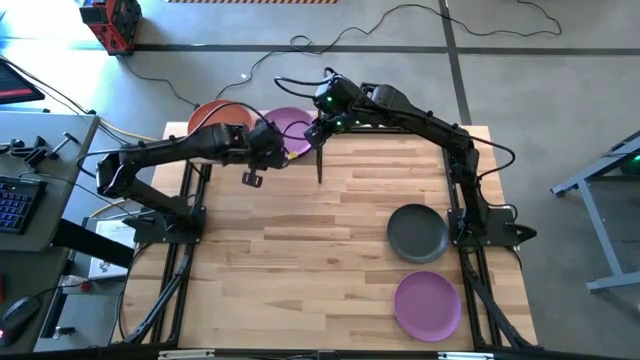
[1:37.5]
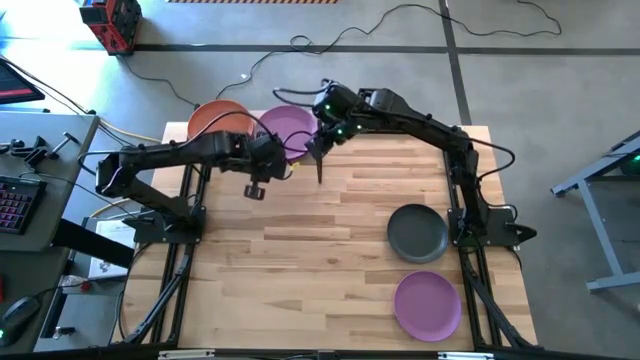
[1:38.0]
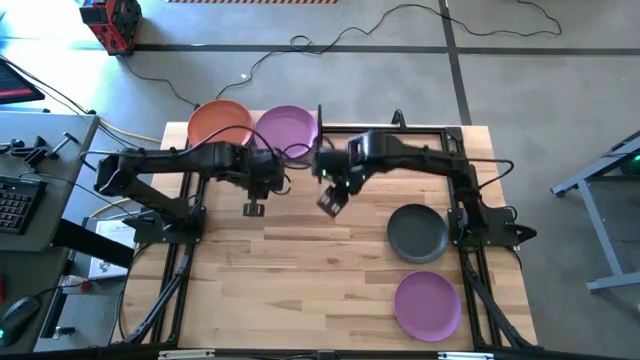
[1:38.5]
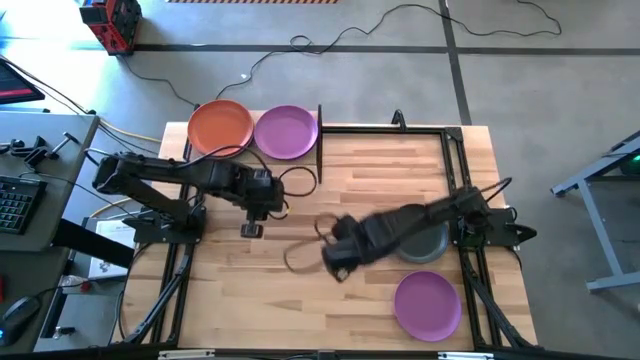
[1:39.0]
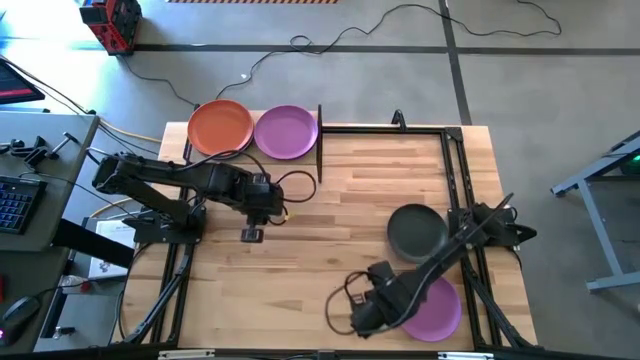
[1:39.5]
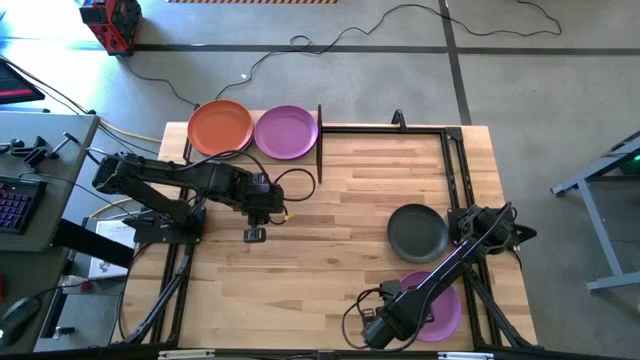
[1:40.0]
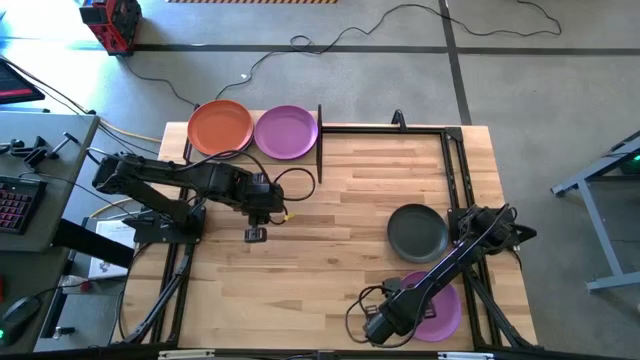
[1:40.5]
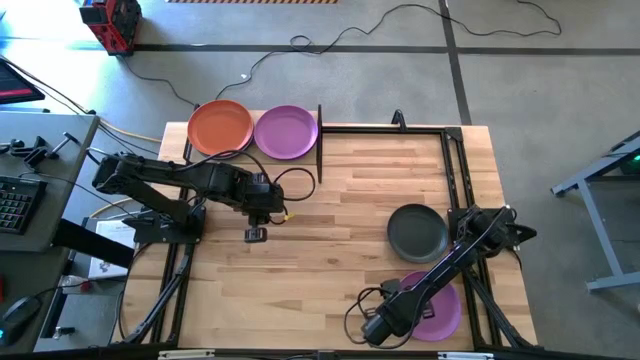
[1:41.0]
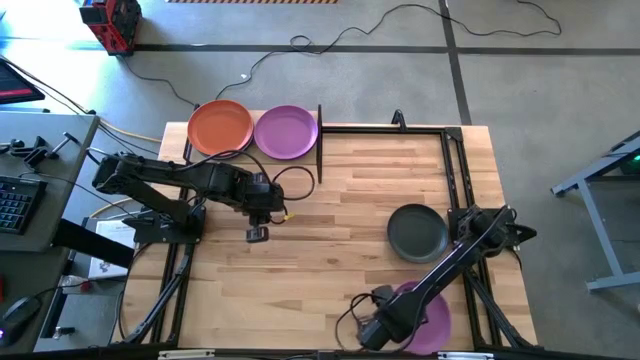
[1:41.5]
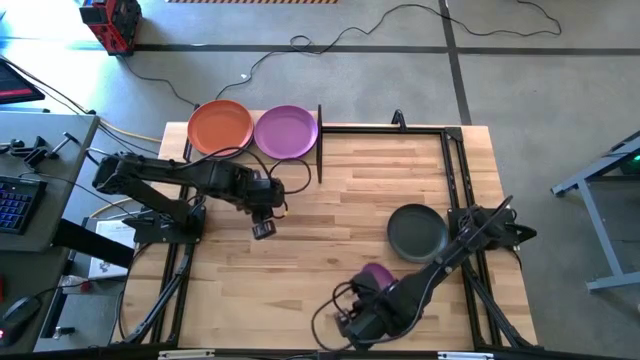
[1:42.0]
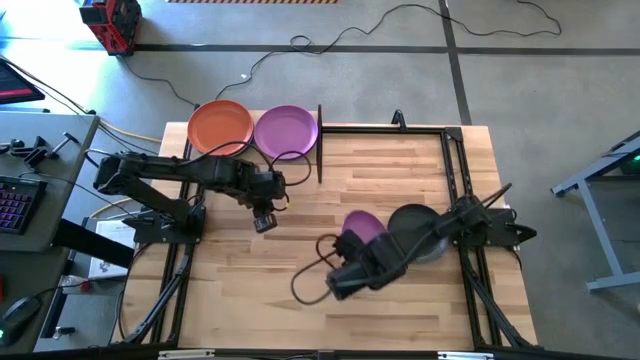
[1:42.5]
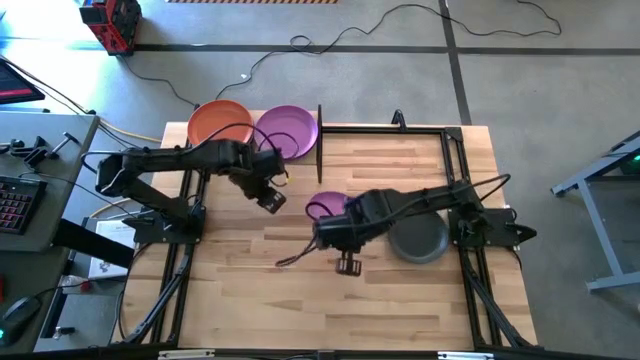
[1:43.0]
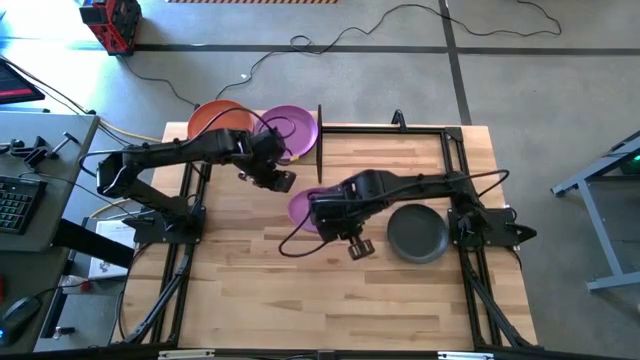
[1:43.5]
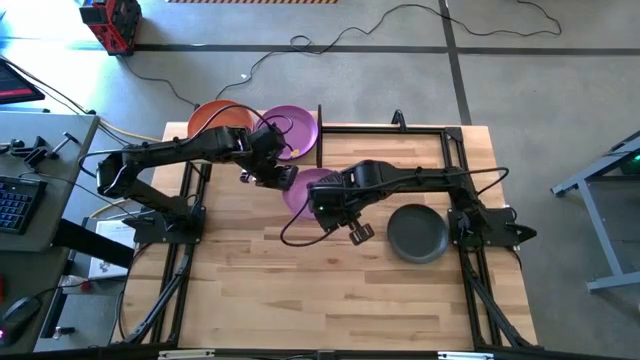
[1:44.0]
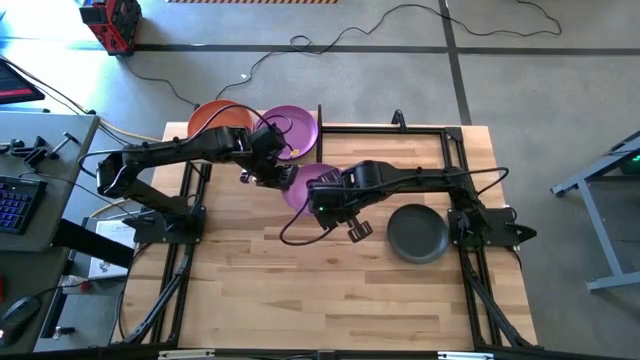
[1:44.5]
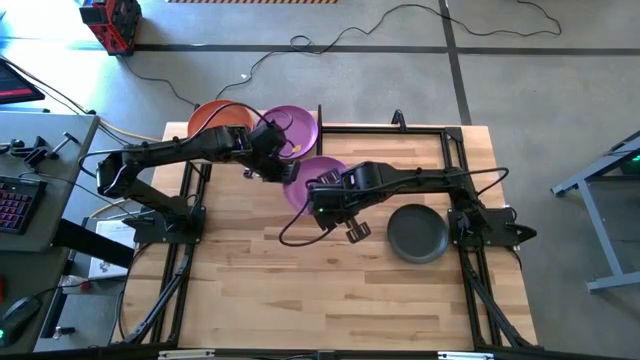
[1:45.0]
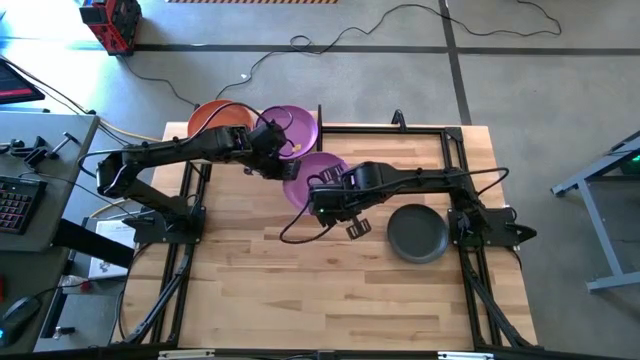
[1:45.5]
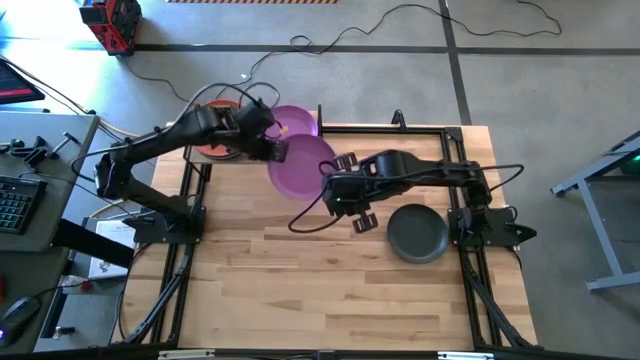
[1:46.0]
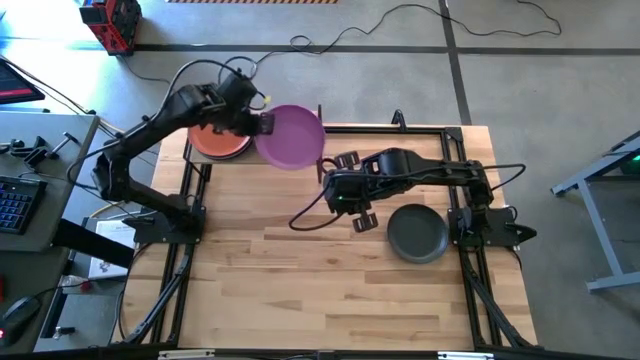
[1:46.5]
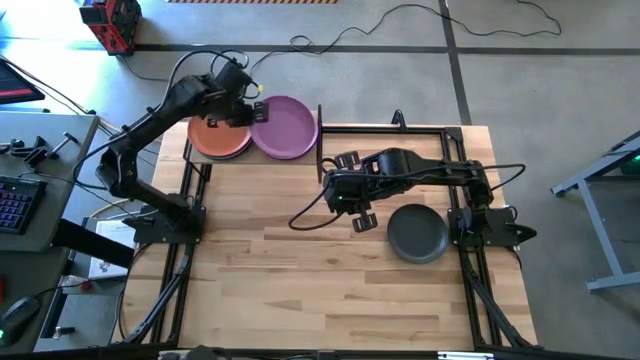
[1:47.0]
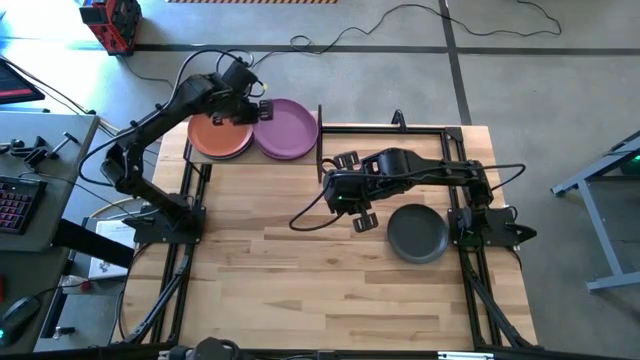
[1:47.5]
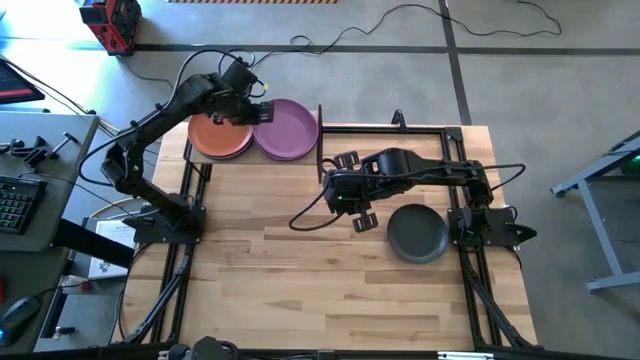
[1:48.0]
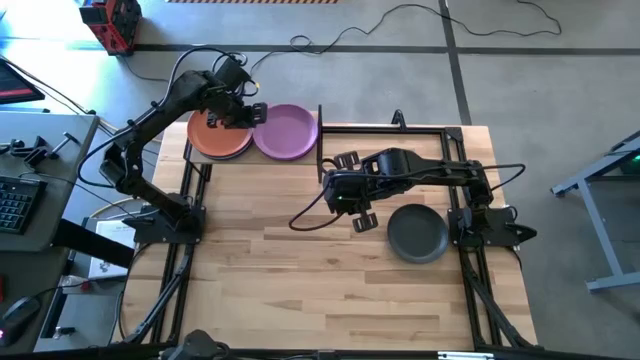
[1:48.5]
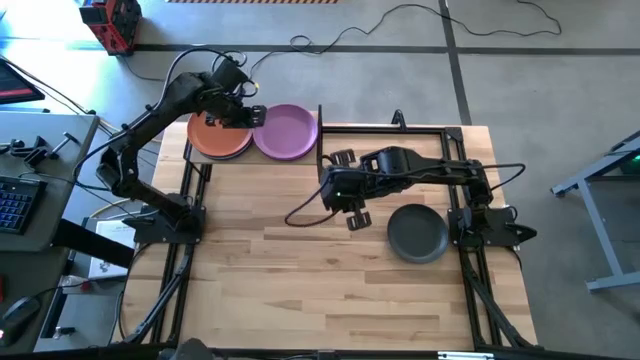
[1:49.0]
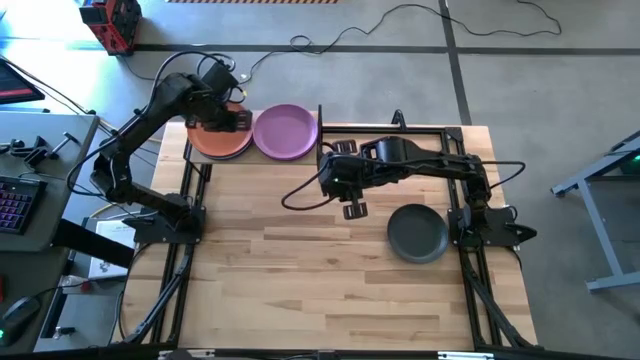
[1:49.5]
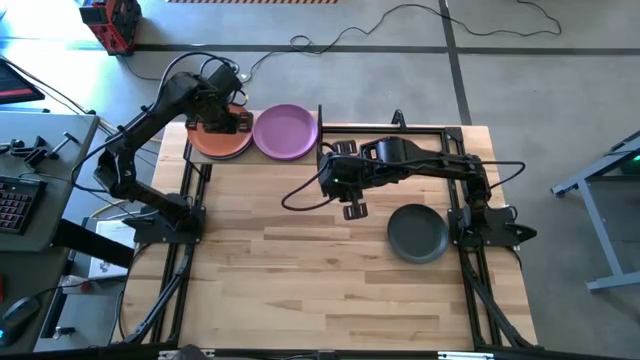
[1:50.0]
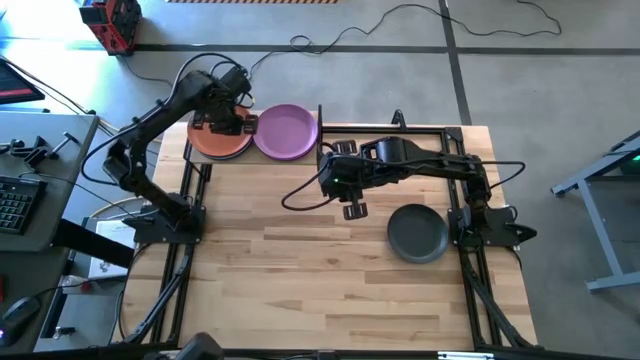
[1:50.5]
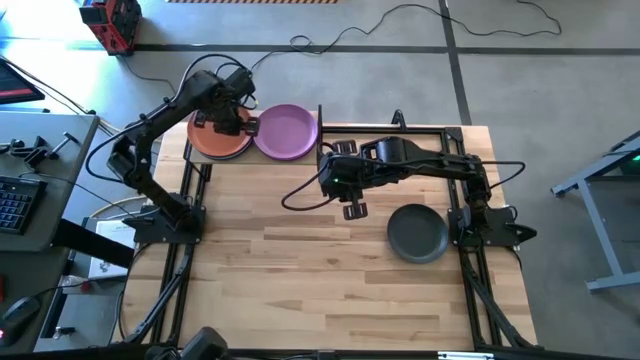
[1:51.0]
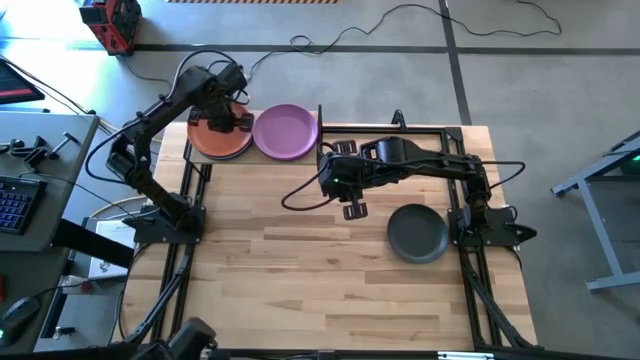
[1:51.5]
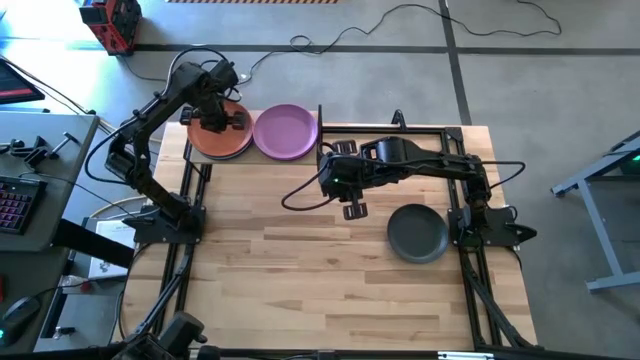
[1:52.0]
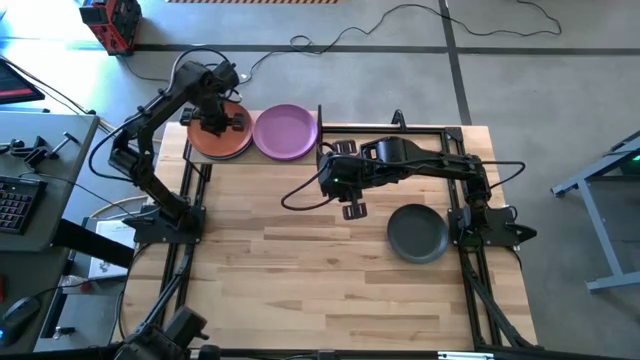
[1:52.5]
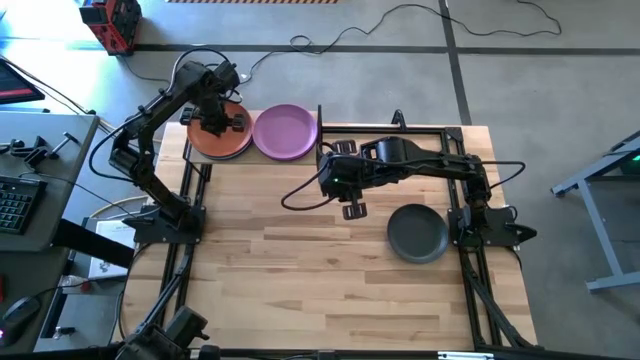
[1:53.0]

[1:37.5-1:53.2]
Task: Place and stack plates onto a shelf
Stack the purple plate on top of the purple plate on the shelf

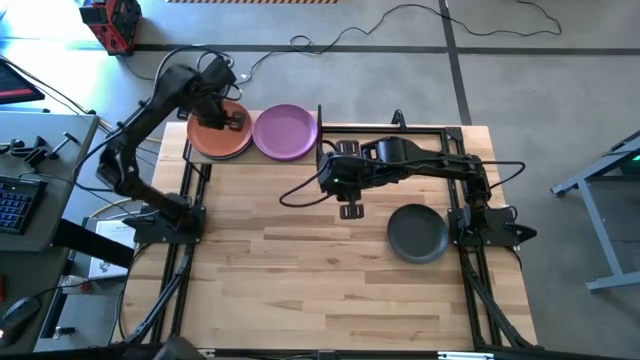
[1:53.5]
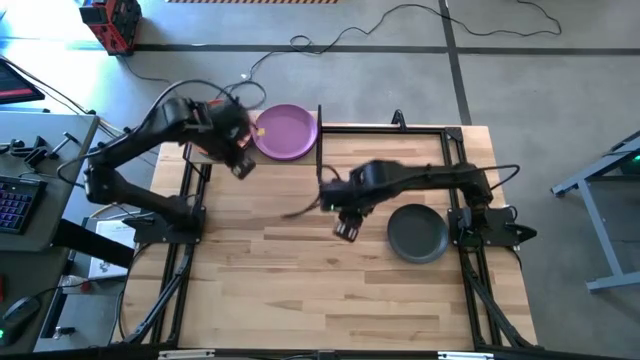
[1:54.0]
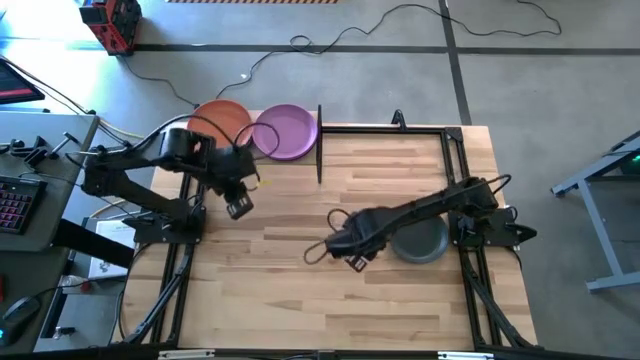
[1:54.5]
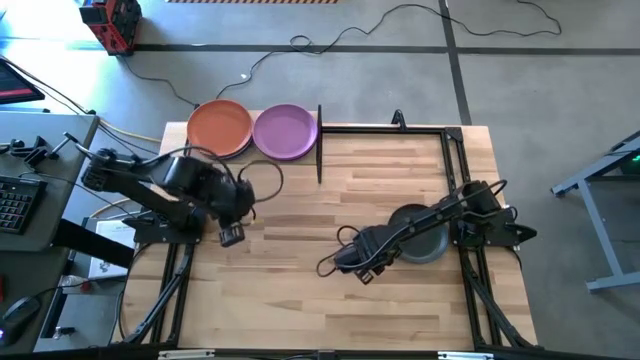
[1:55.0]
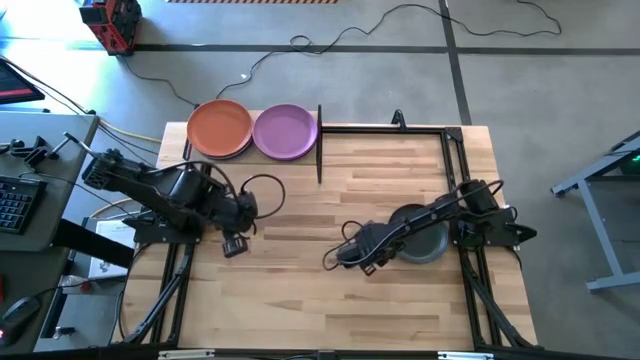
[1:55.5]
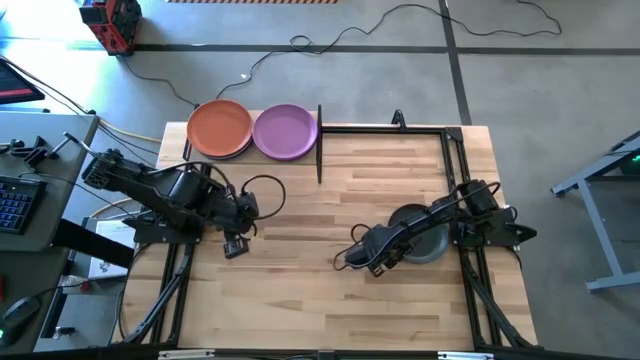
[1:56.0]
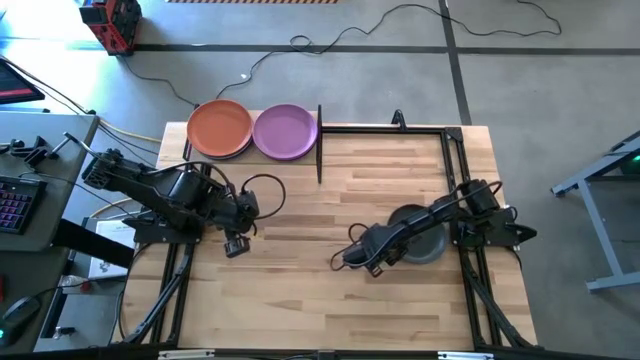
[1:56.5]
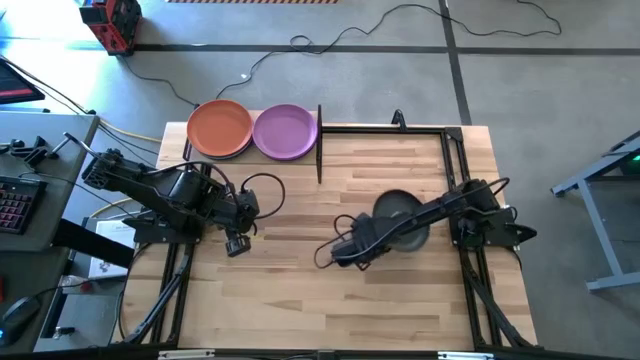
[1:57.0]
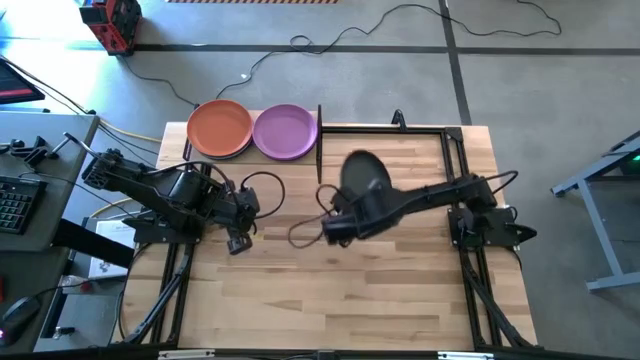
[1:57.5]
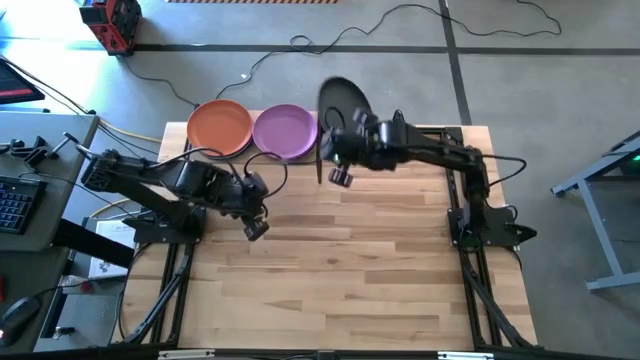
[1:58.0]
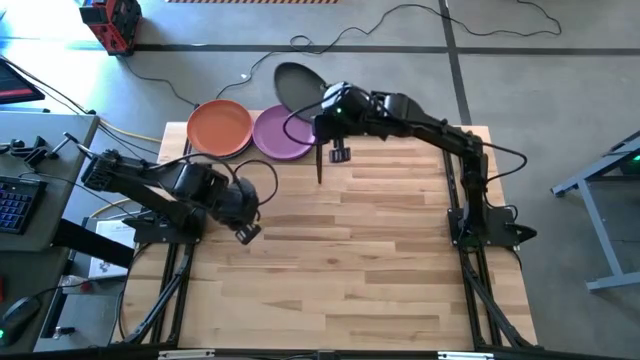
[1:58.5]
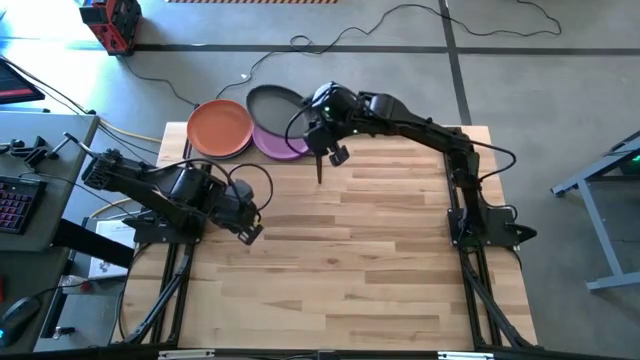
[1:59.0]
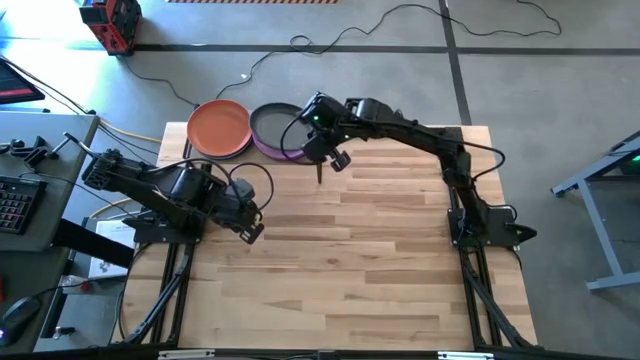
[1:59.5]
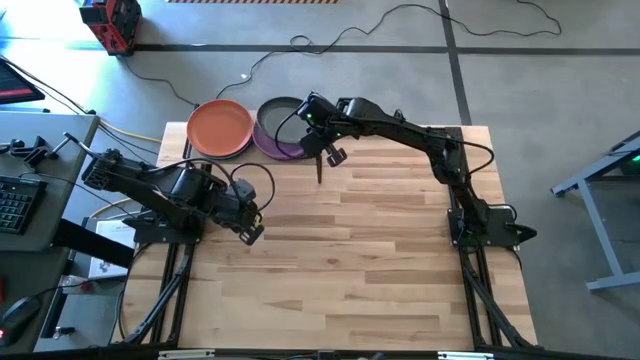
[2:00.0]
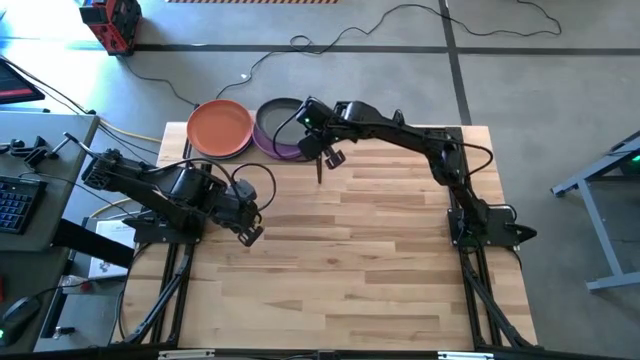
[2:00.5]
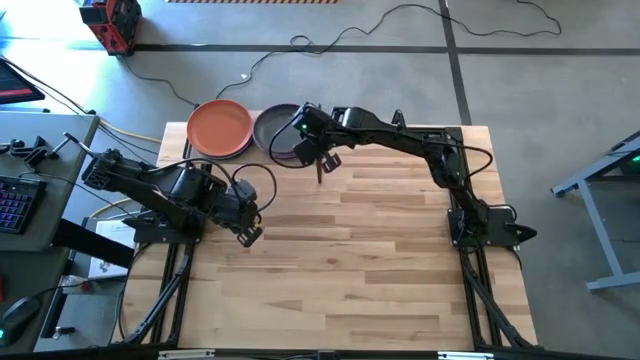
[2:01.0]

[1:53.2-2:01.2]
Stack the black plate on top of the purple plate on the shelf
